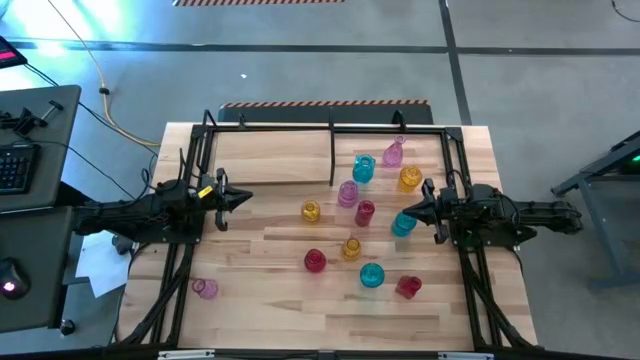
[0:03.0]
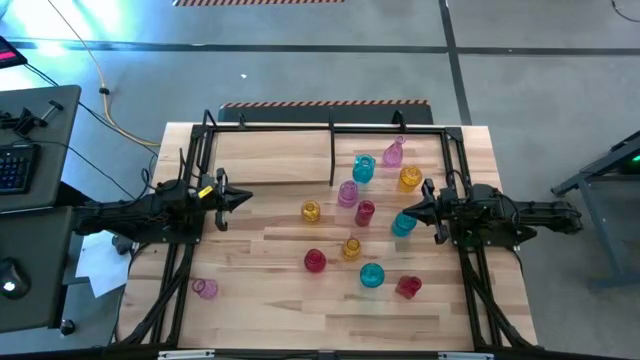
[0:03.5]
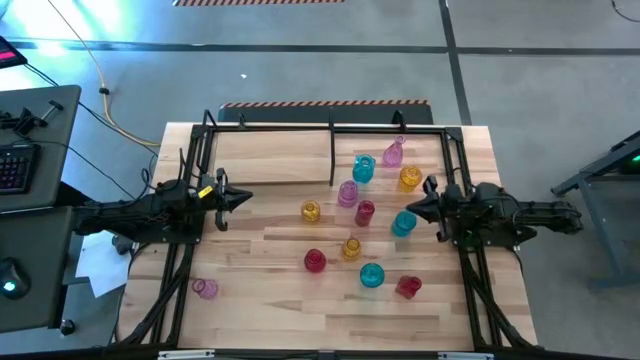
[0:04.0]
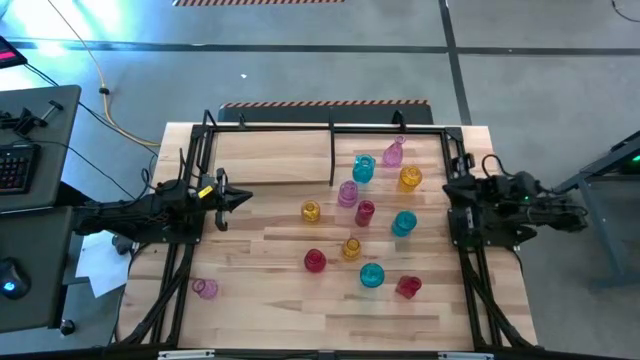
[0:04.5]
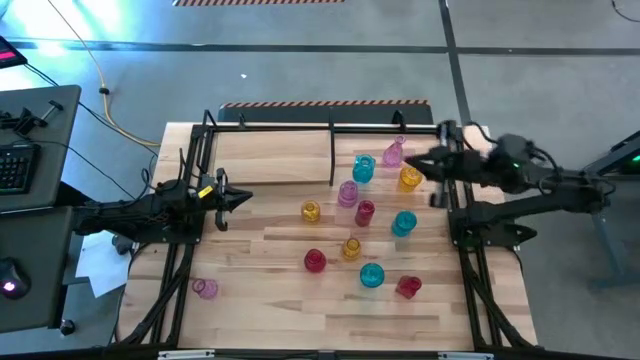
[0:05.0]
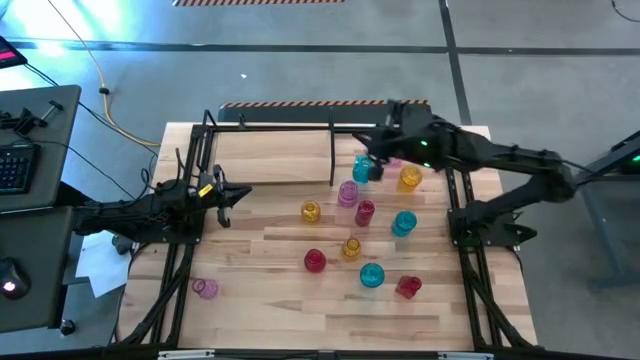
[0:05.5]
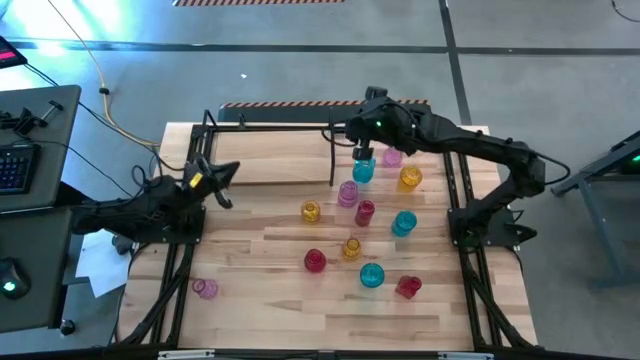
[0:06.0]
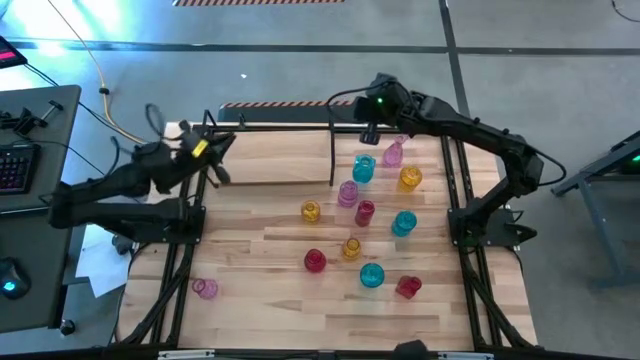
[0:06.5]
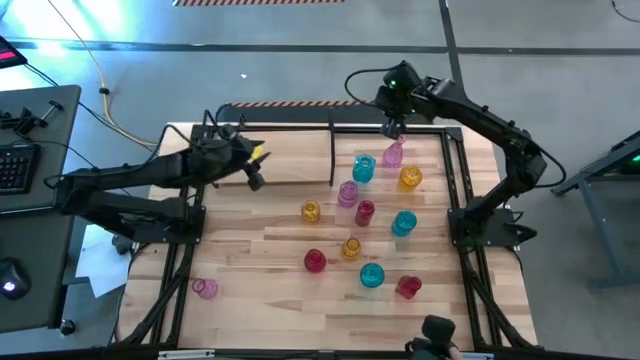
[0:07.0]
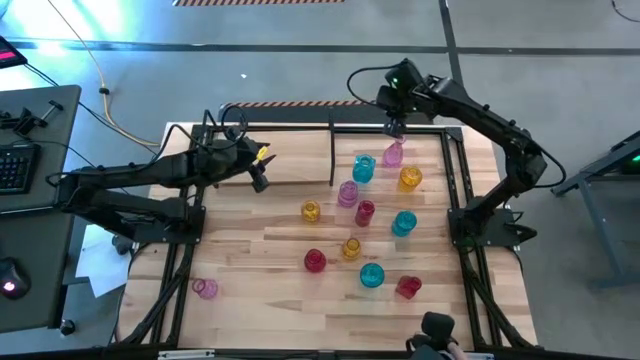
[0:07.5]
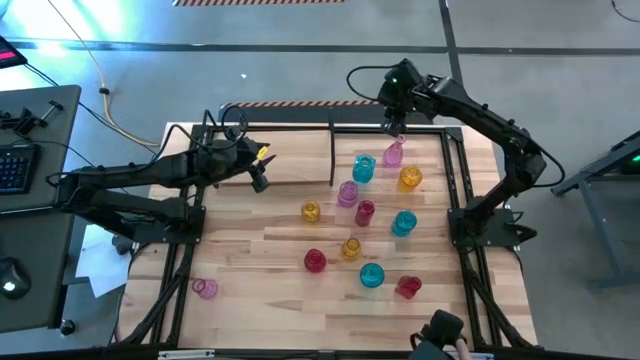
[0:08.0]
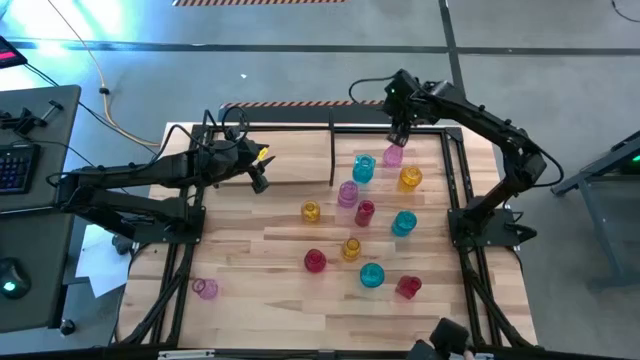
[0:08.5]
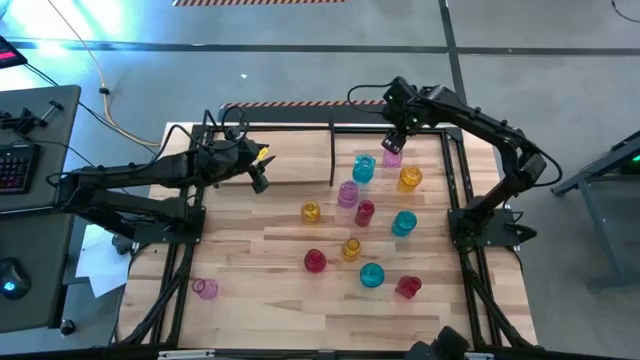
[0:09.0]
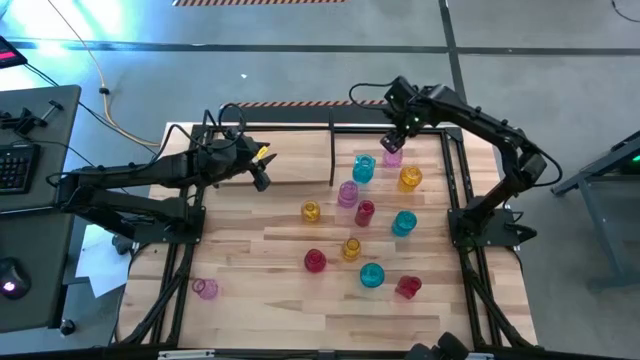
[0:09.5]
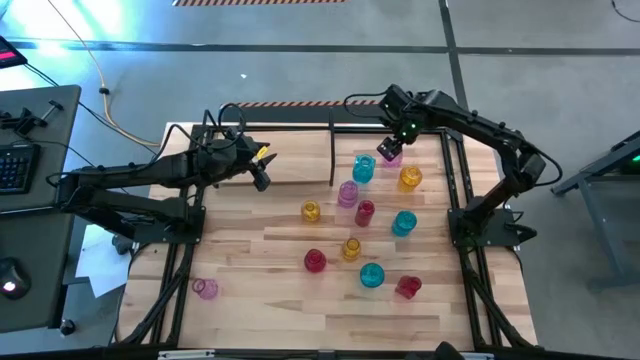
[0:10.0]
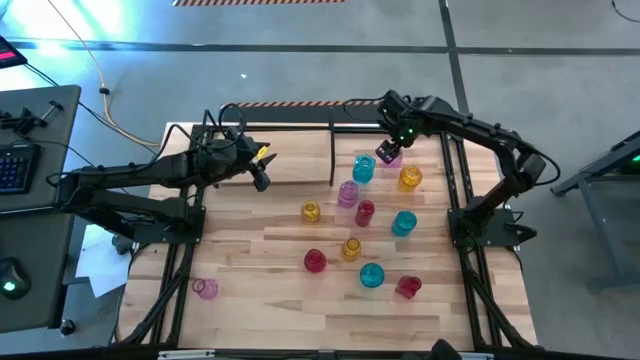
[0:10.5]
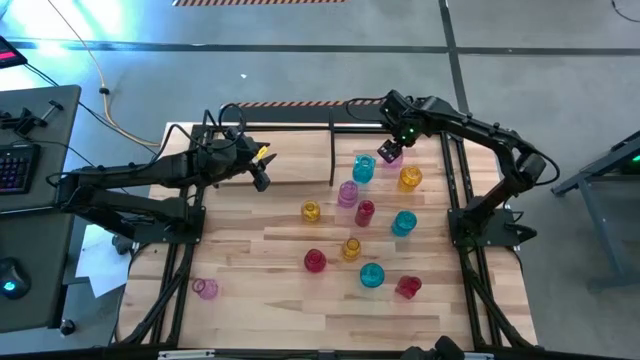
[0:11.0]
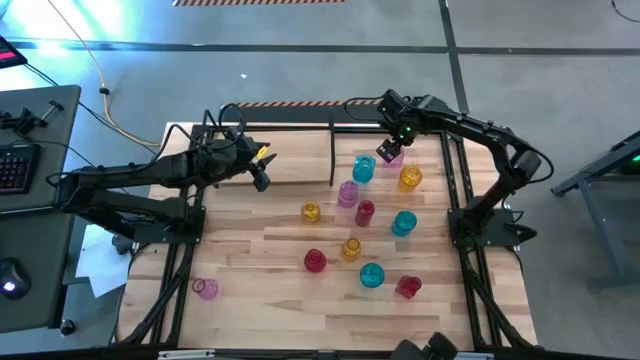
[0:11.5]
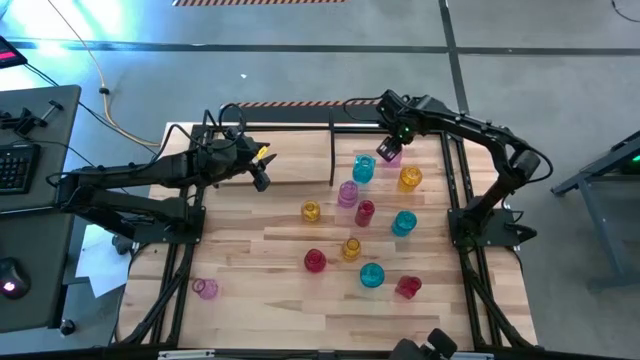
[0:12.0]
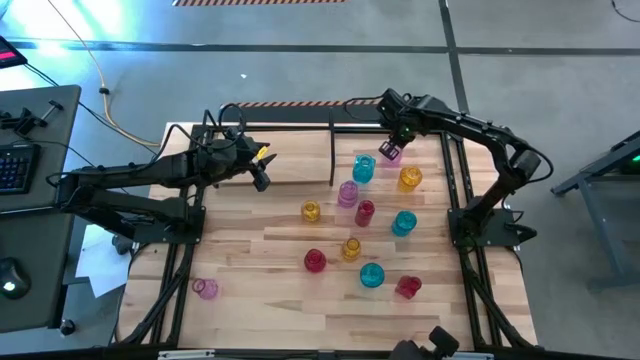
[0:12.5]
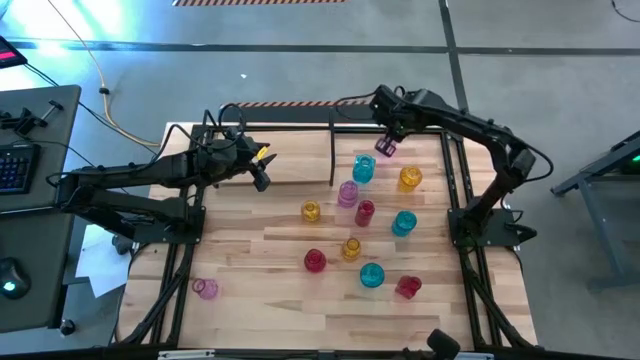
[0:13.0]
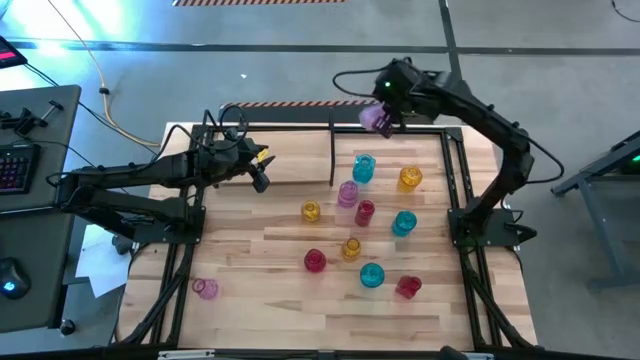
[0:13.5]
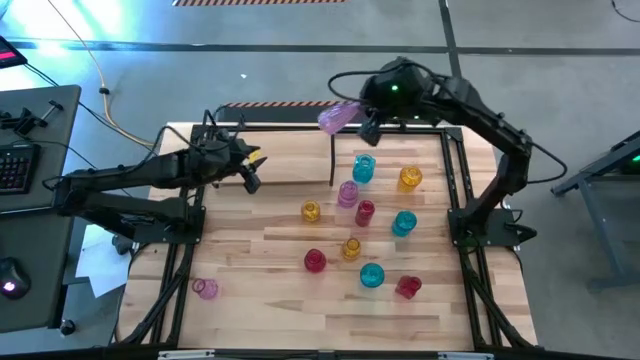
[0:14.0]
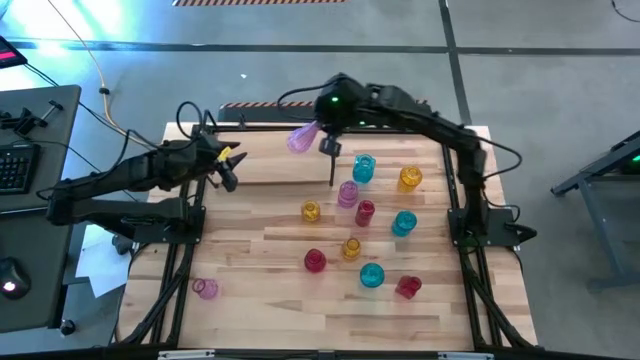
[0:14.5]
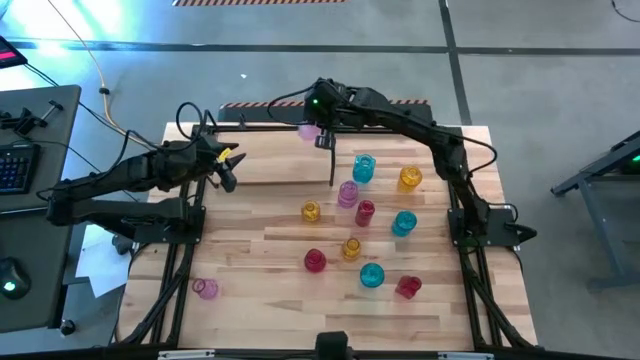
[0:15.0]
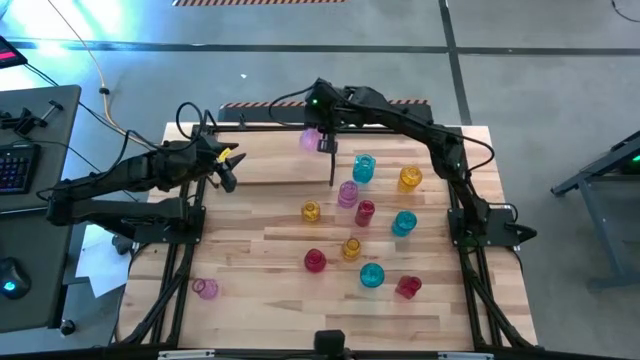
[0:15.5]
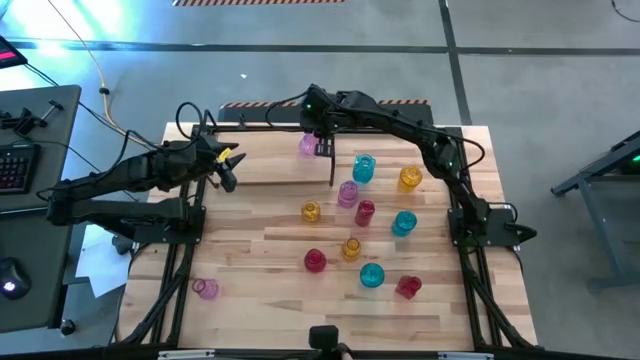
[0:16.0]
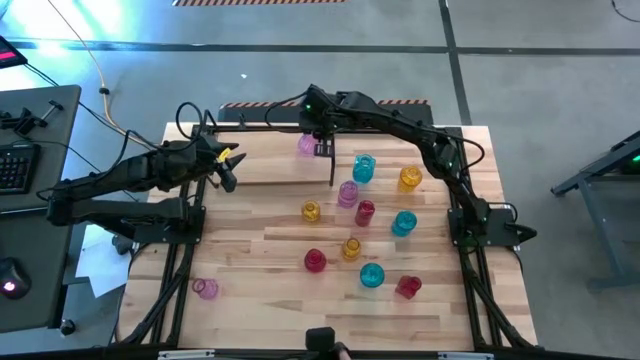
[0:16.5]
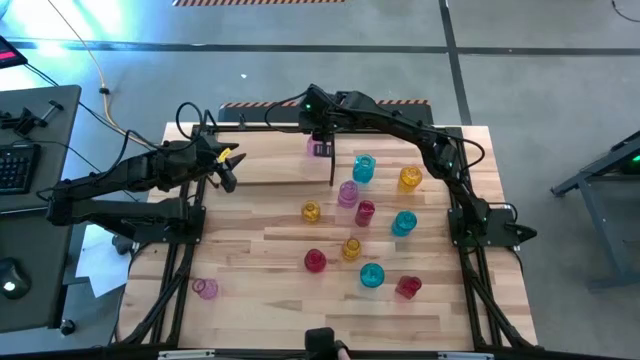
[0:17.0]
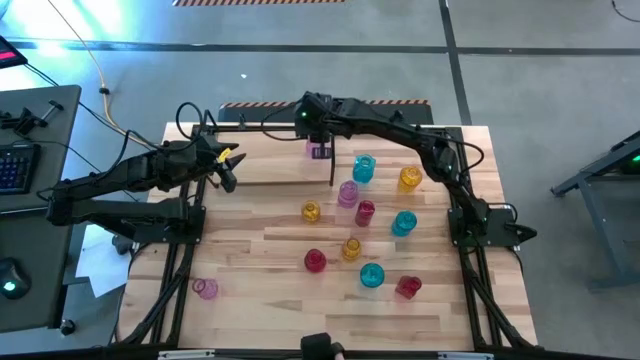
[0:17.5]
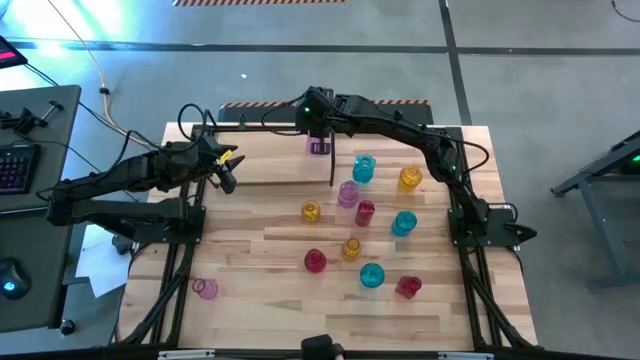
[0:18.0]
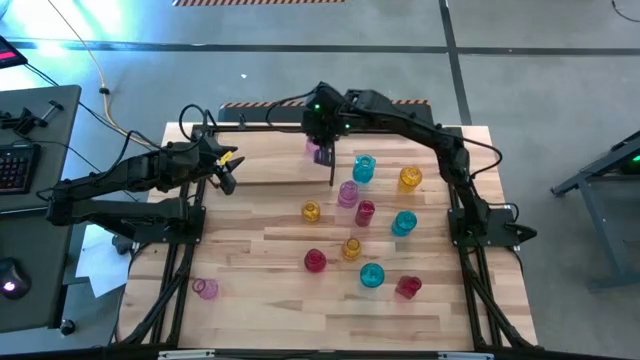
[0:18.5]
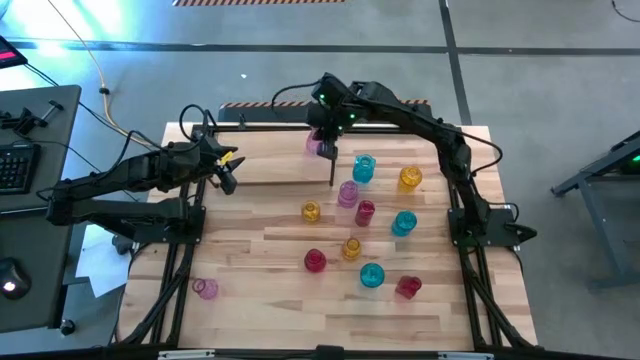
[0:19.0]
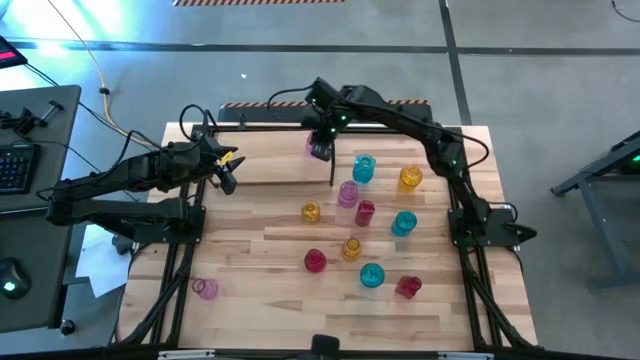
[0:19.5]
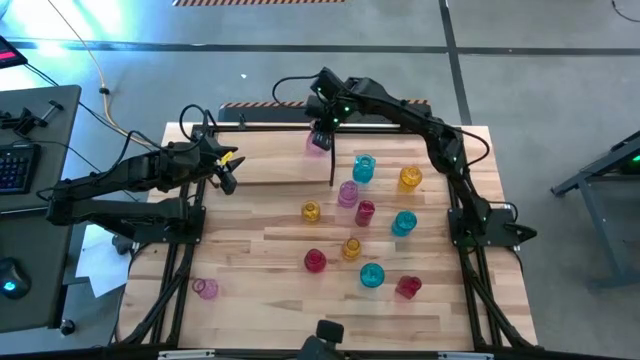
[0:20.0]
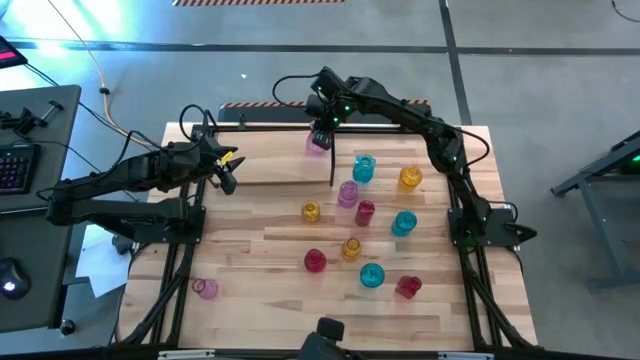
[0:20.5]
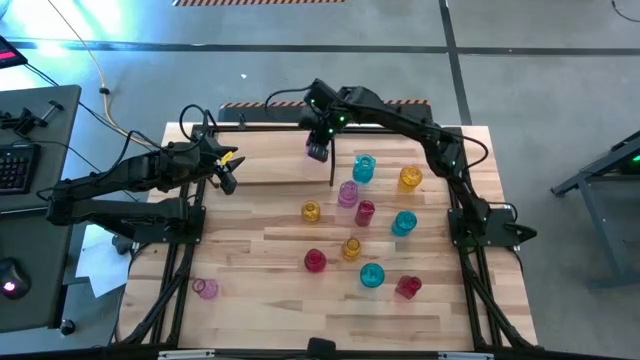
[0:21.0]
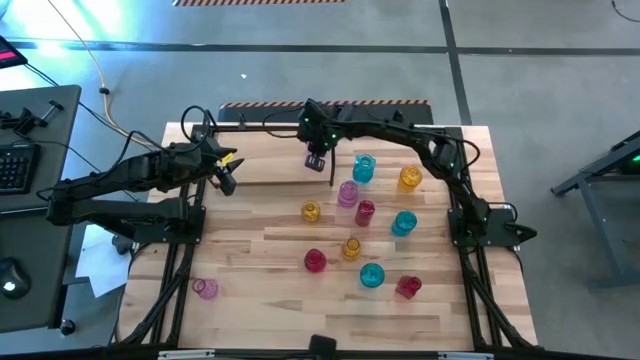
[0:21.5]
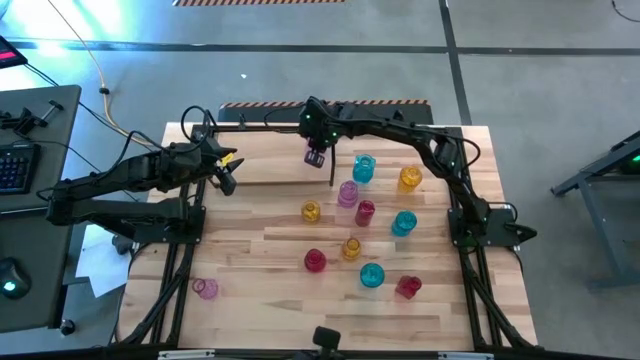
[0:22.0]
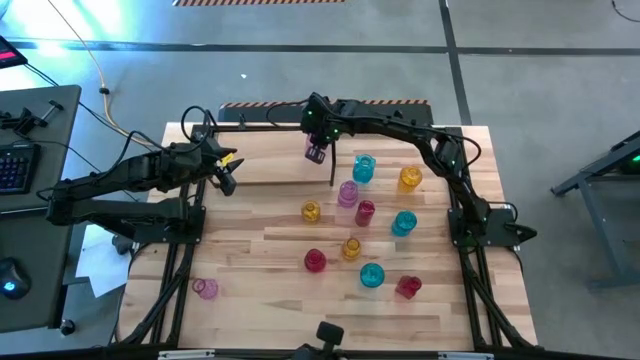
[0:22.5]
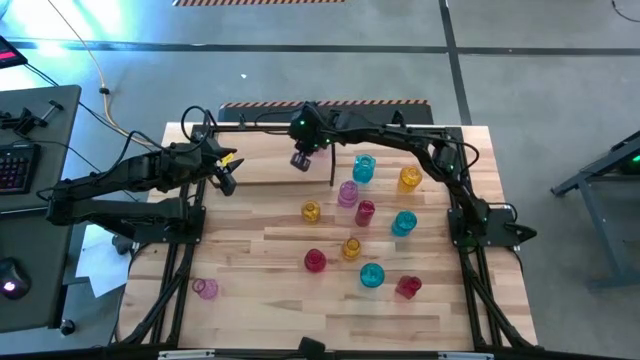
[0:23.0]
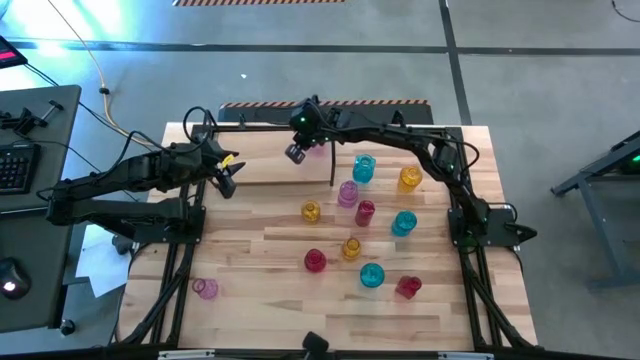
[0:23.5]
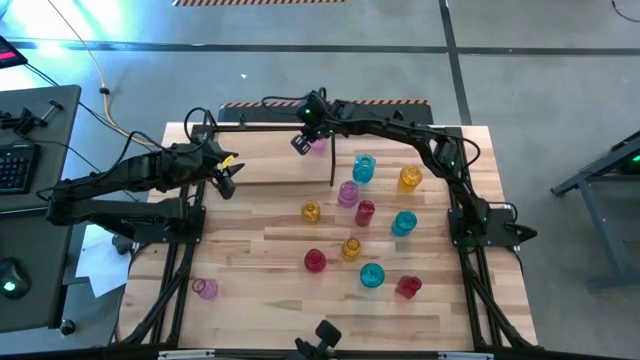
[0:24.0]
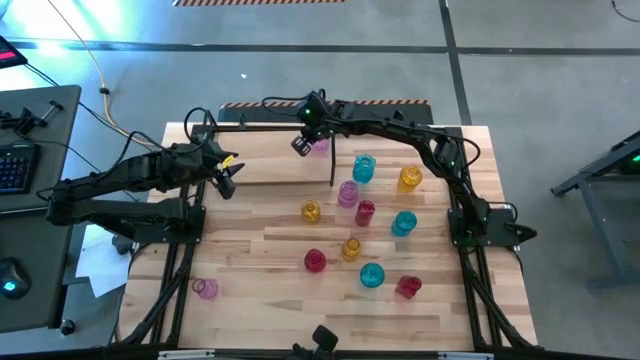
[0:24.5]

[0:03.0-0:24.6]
Task: sort vases onto shelf
Put the top right purple vase on the shelf
